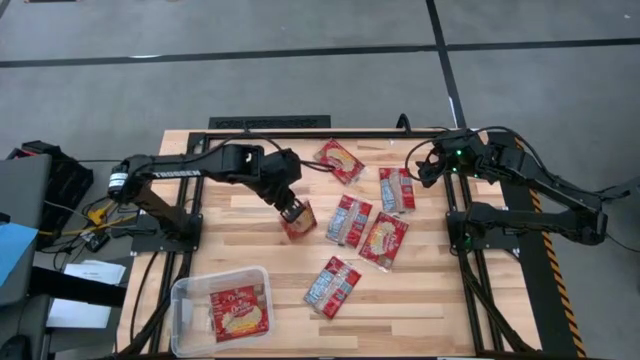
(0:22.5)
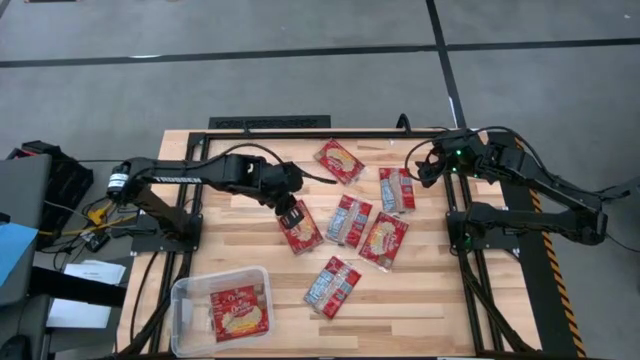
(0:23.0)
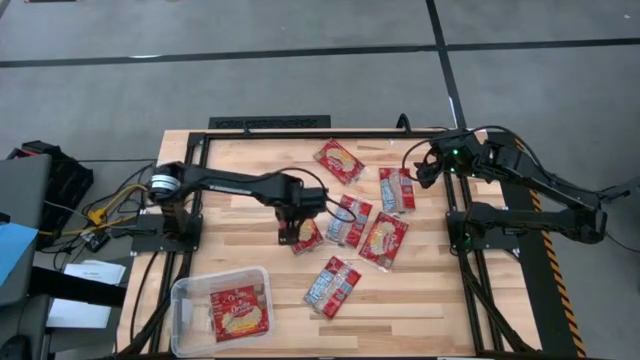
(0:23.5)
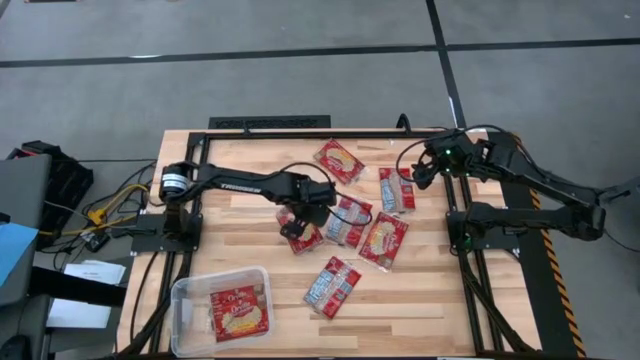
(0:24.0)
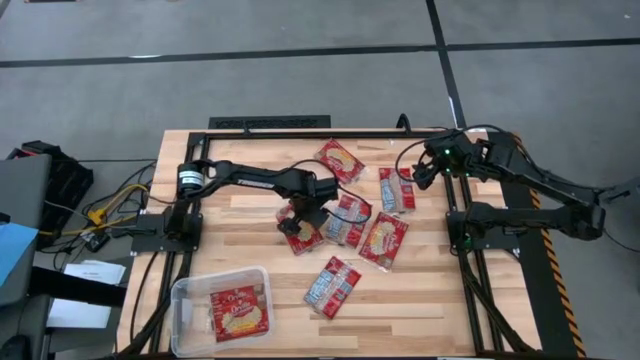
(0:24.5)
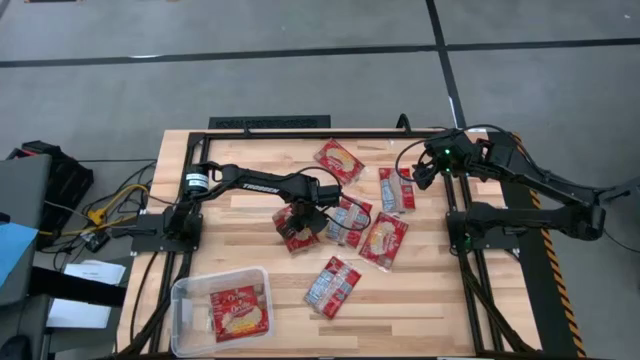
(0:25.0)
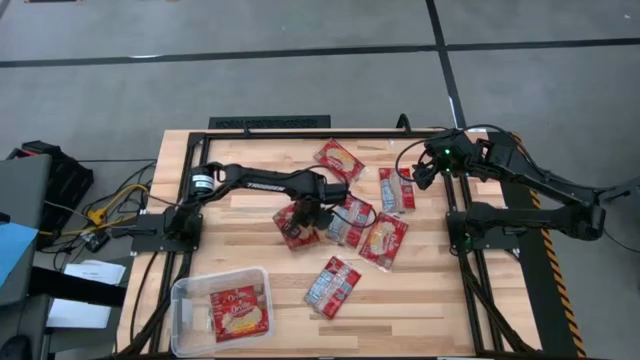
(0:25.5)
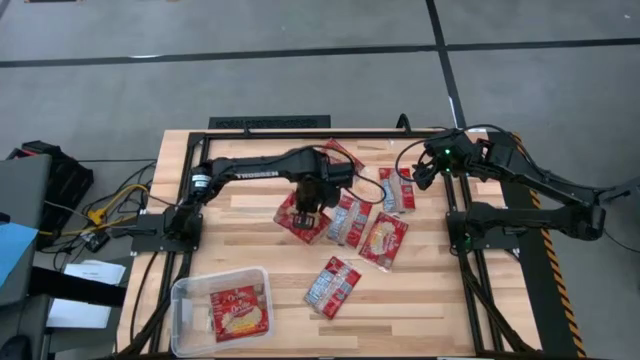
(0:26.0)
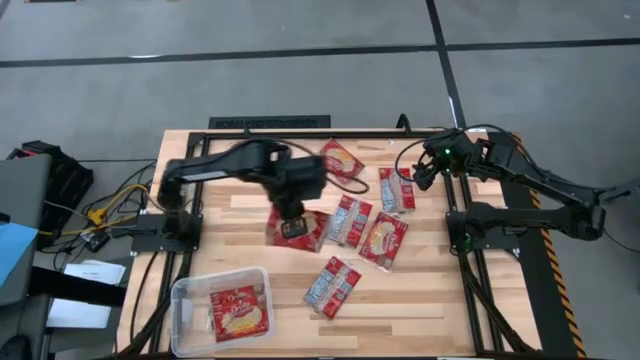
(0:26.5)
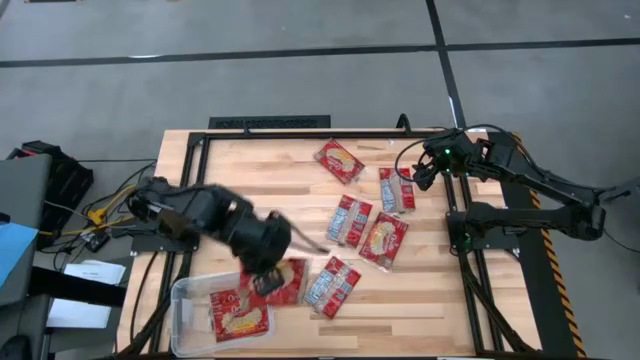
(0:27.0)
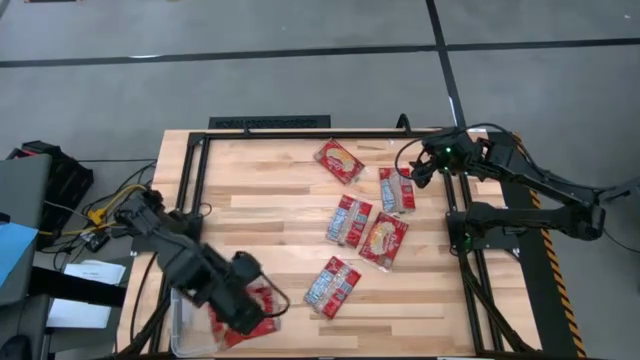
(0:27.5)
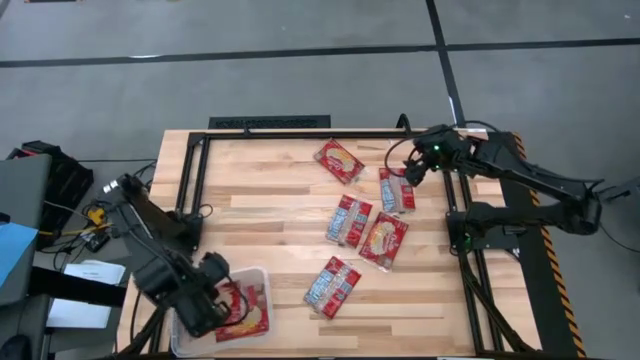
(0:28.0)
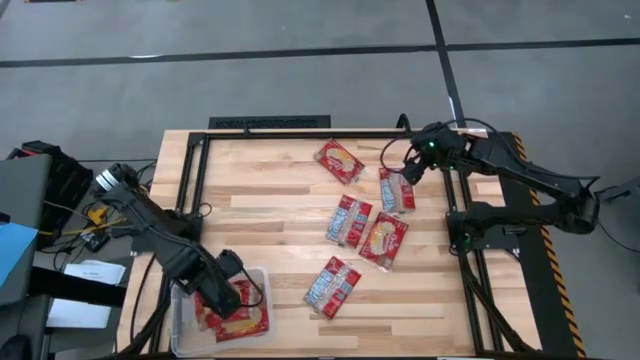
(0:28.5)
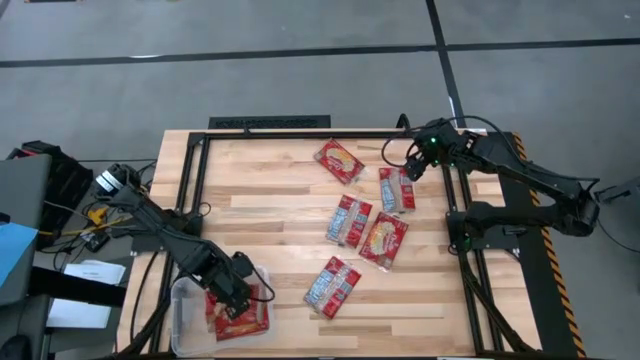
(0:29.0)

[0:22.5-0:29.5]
Task: Sort popcorn bags into baskets
Put the red popcorn bag into the transparent bin

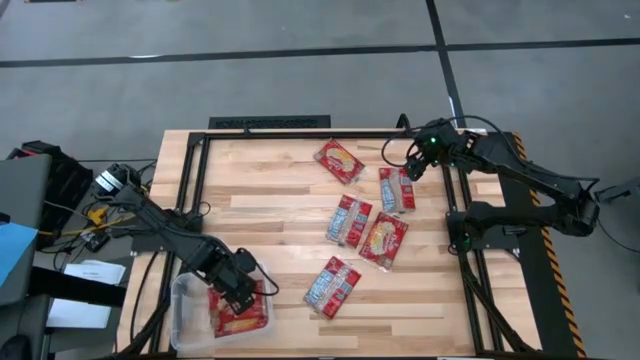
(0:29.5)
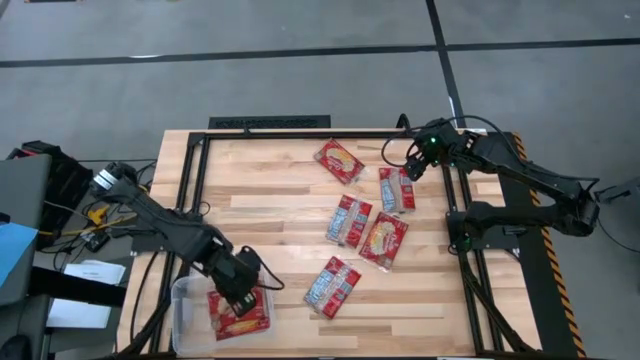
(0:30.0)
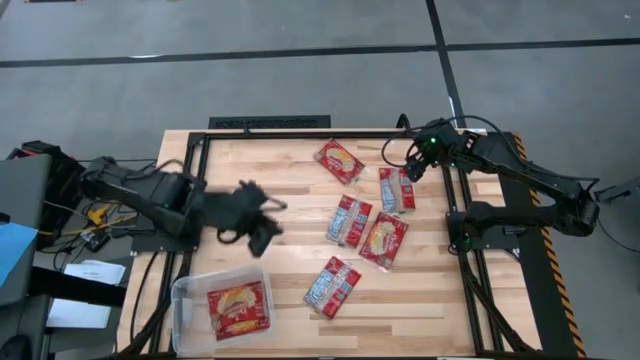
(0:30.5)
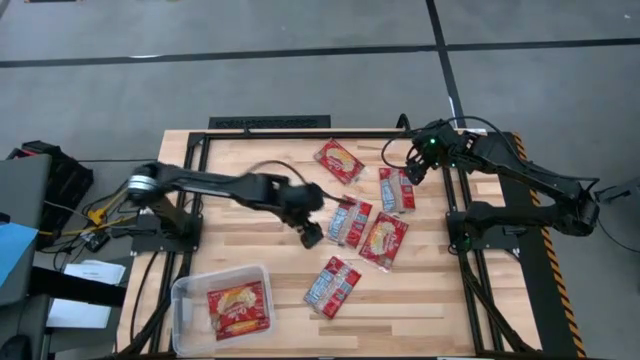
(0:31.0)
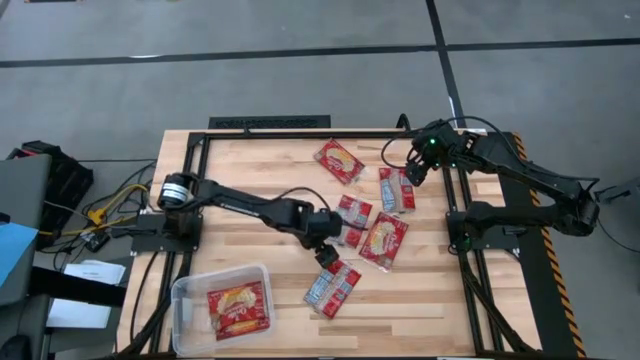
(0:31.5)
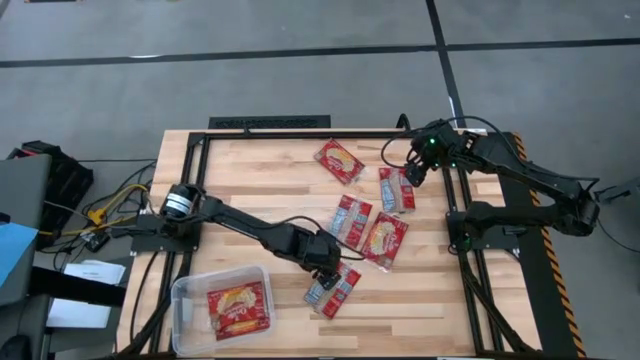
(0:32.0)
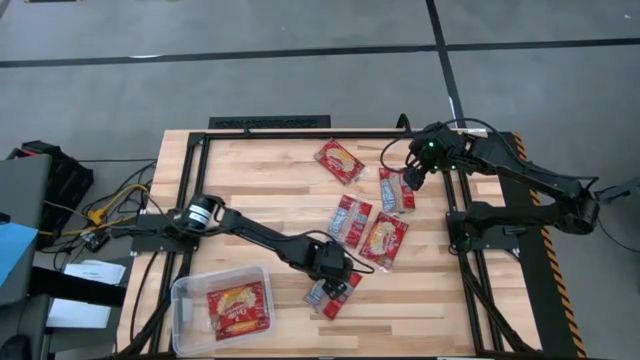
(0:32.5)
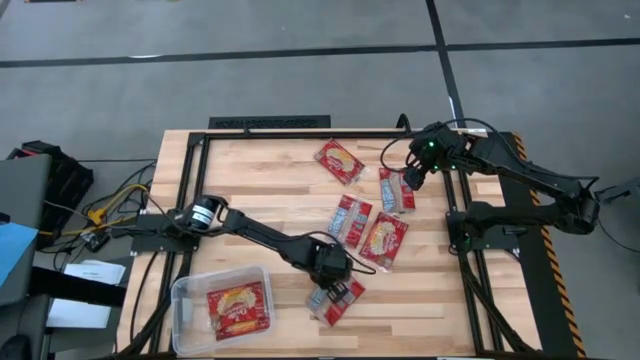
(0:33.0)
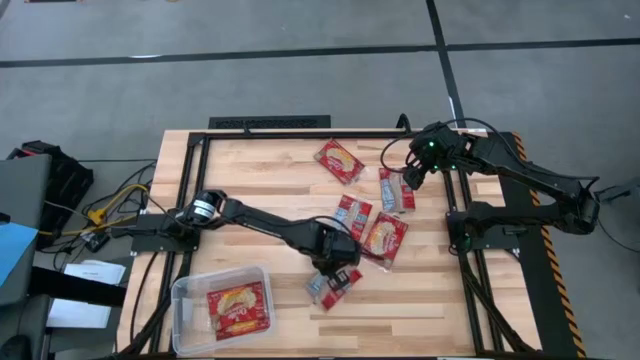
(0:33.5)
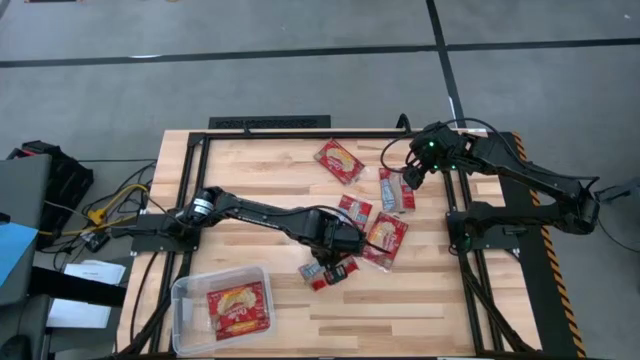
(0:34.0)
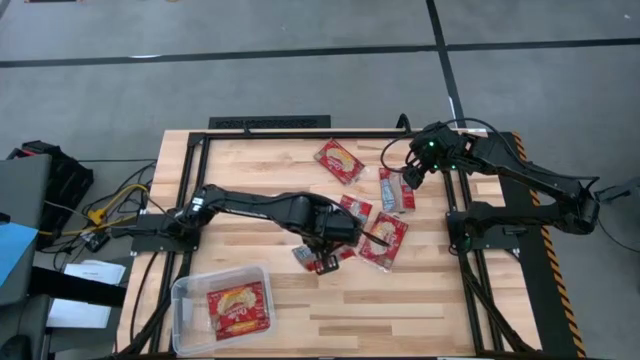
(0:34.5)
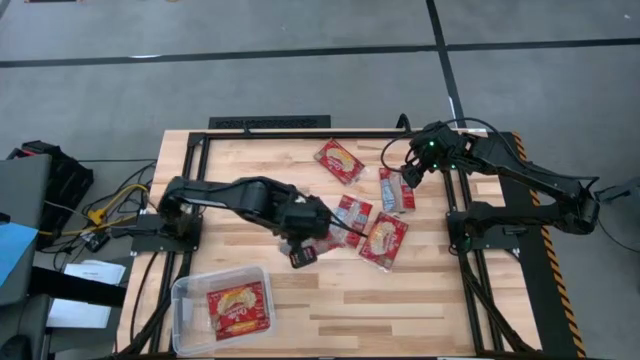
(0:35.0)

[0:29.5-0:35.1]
Put the red popcorn bag into the transparent bin

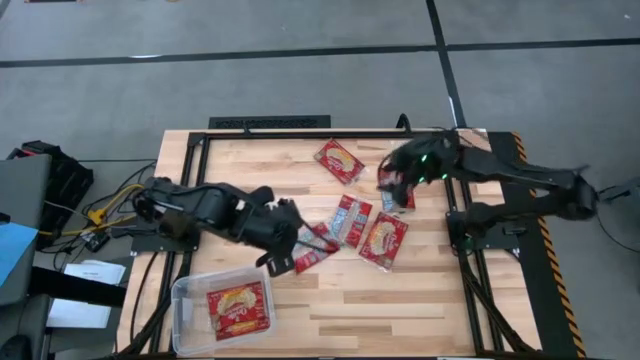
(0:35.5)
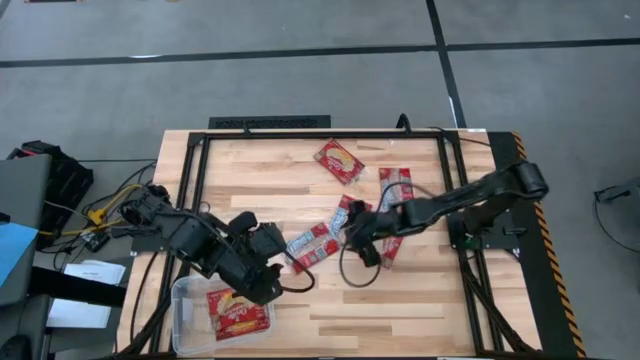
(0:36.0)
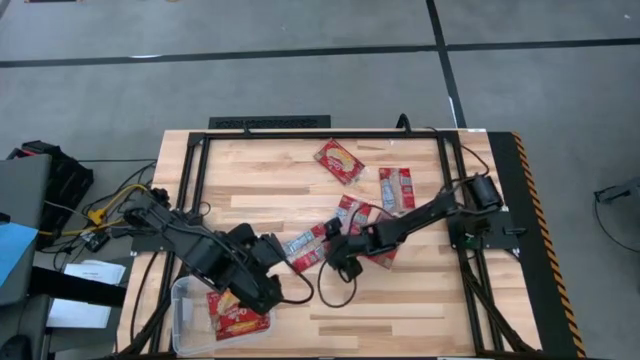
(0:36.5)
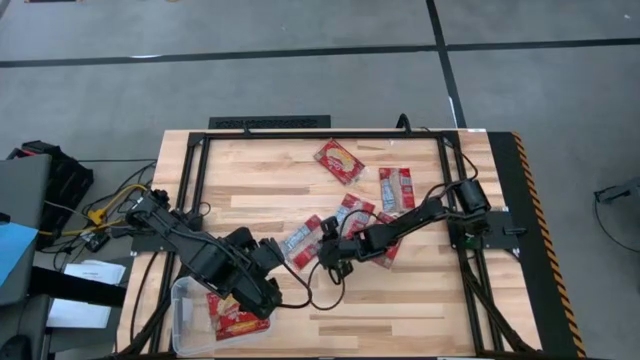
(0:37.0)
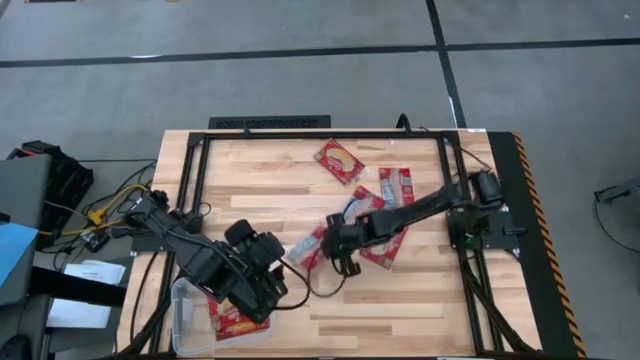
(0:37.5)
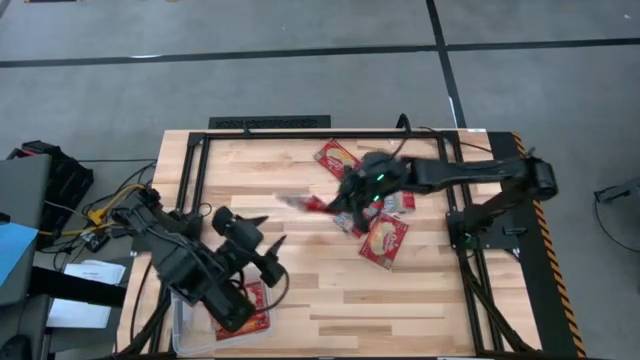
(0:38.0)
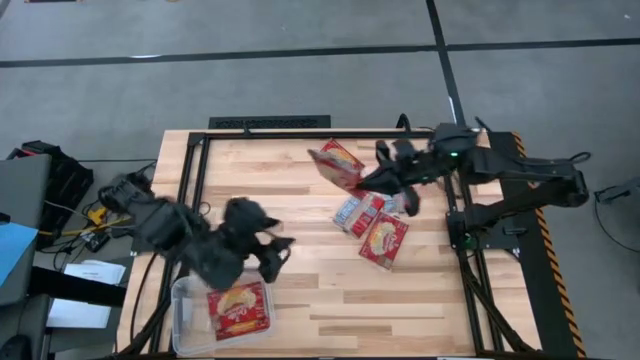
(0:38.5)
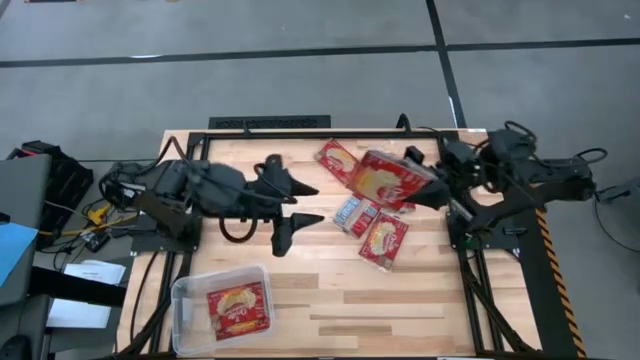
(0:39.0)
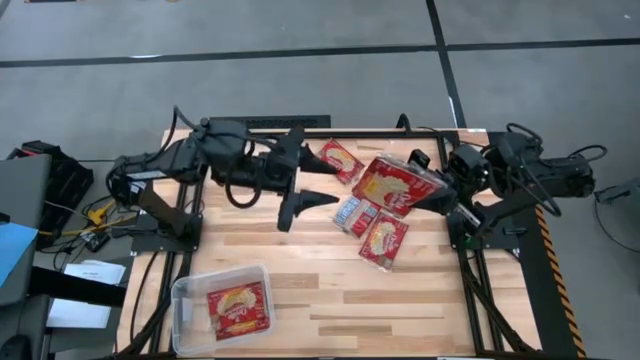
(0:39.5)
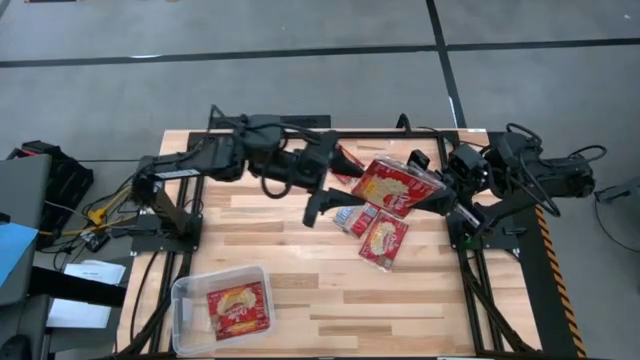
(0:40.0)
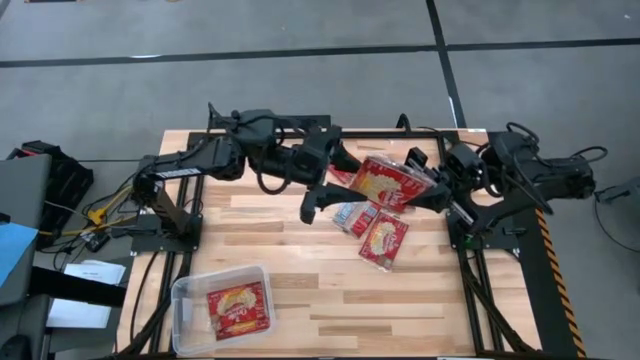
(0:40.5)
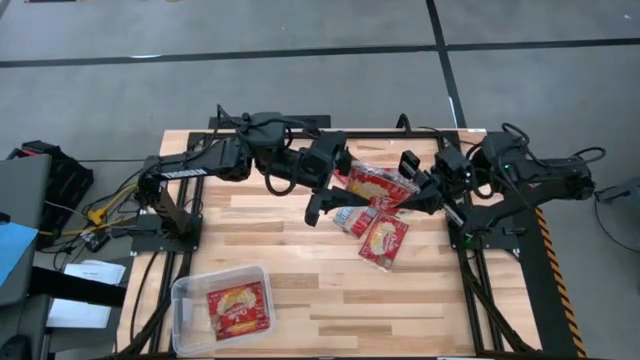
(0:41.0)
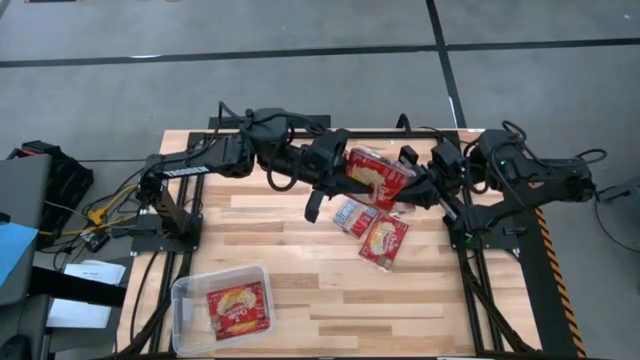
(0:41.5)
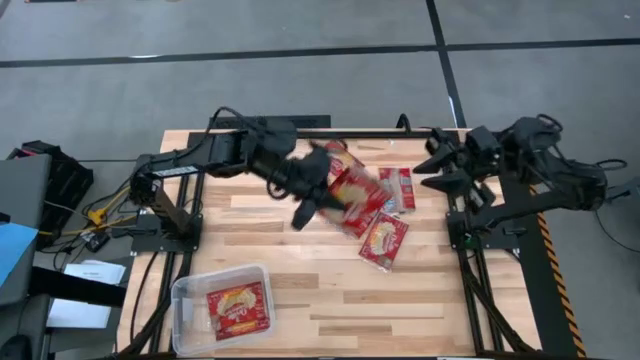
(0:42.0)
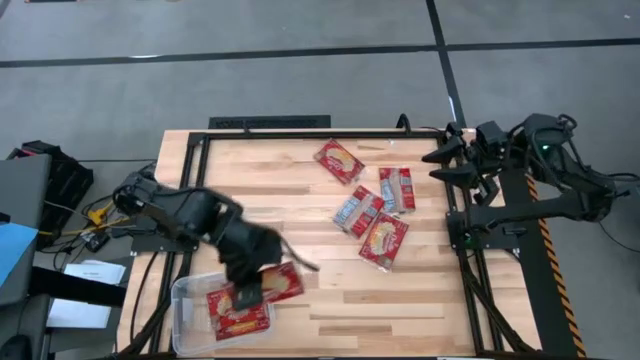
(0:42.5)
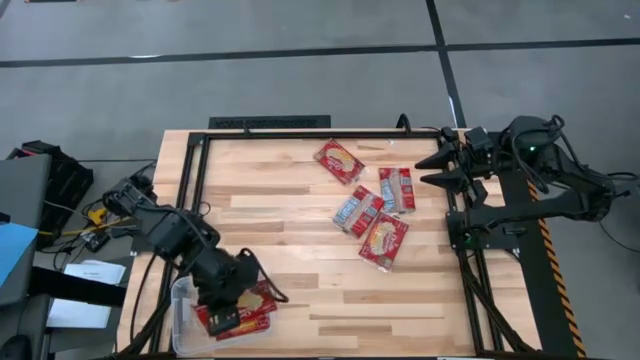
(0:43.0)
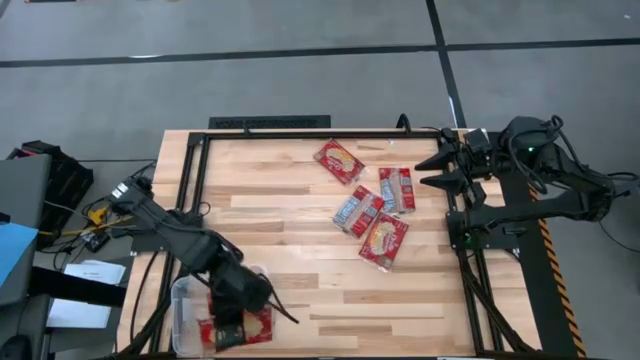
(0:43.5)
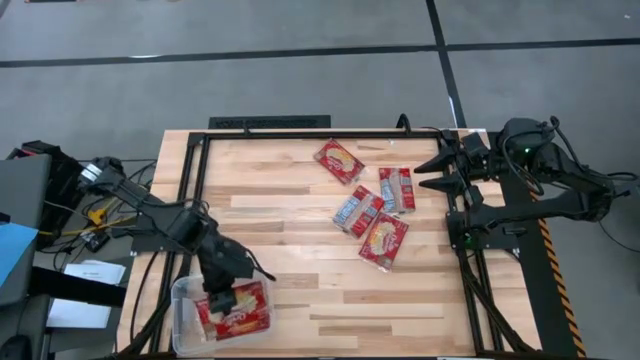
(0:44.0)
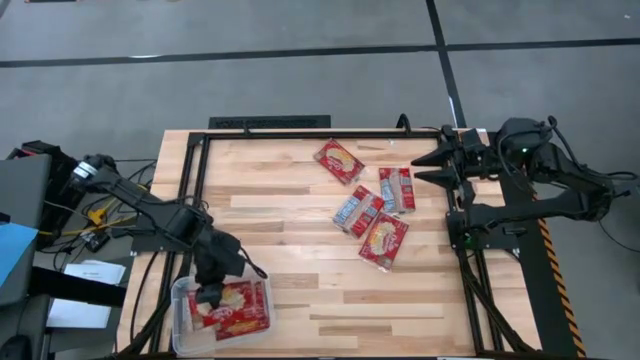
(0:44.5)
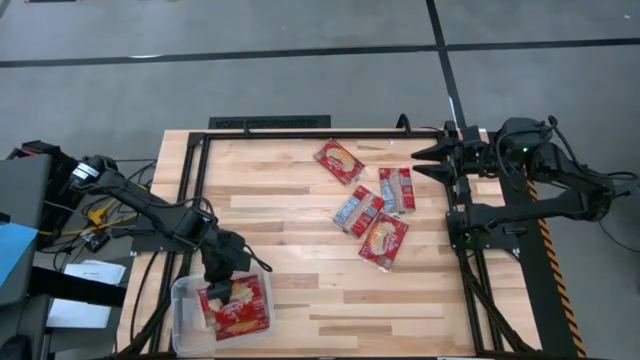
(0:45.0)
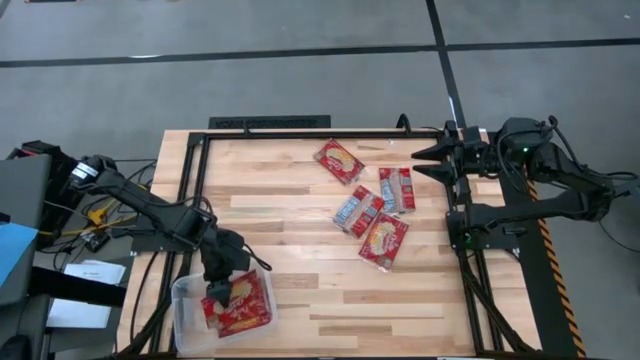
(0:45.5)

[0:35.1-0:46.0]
Put the red popcorn bag into the transparent bin
